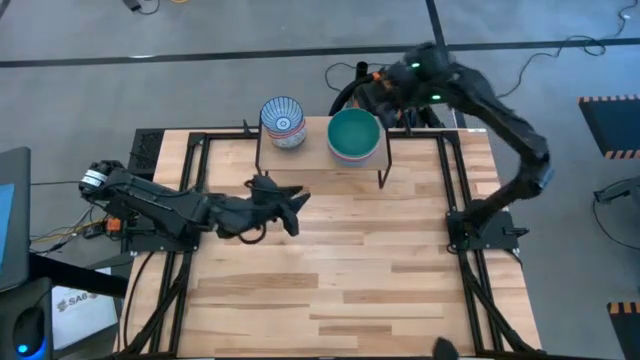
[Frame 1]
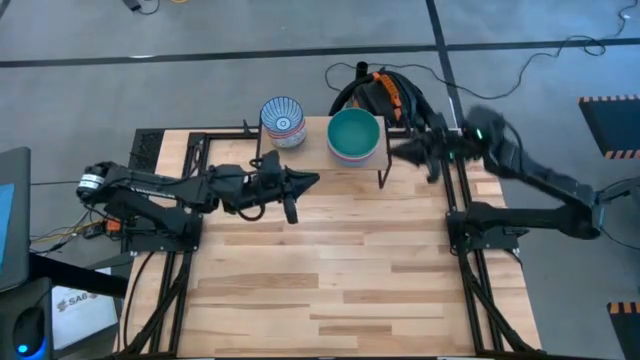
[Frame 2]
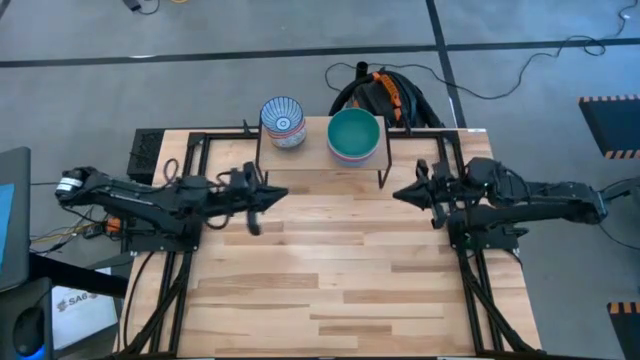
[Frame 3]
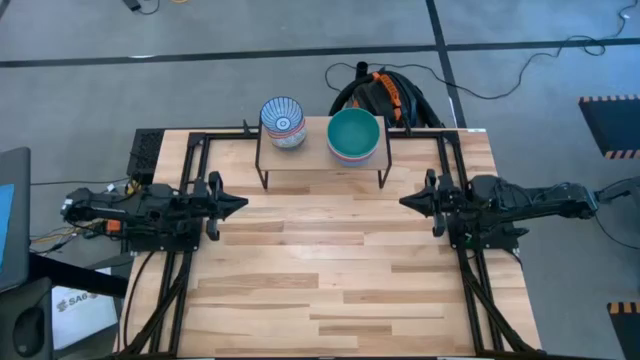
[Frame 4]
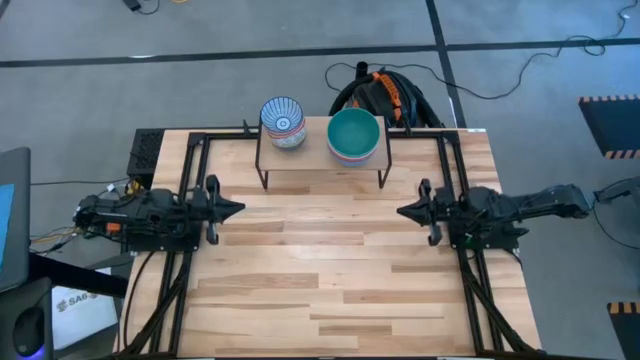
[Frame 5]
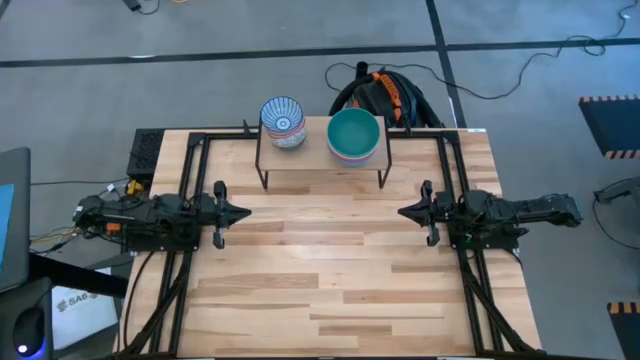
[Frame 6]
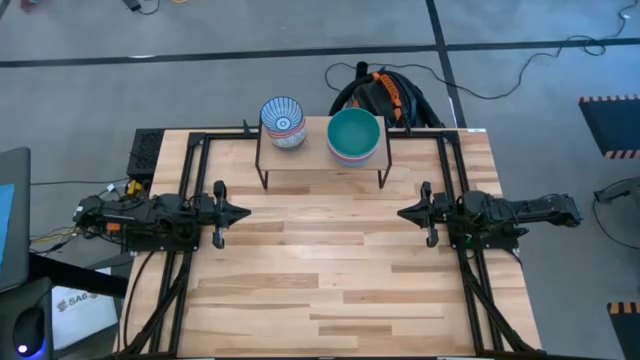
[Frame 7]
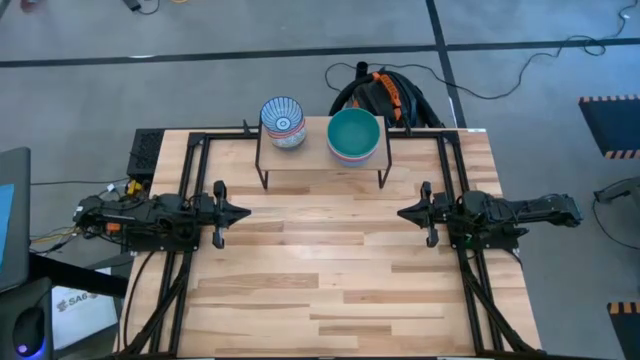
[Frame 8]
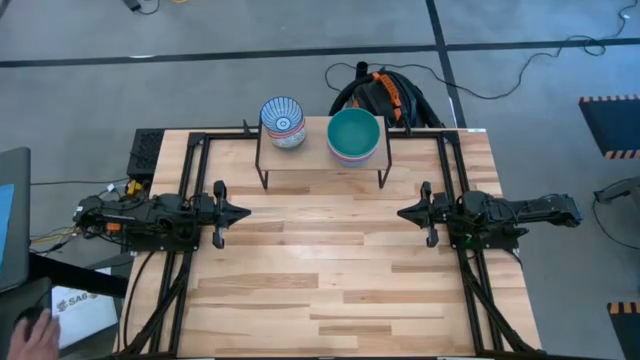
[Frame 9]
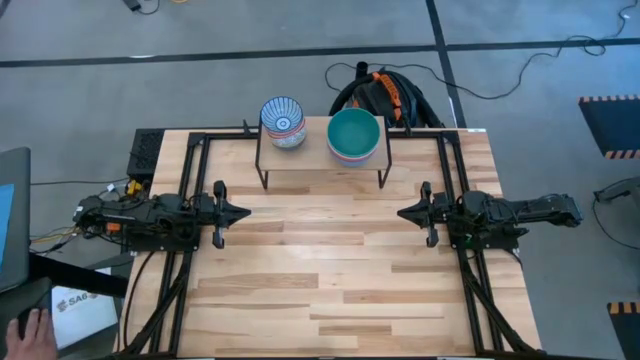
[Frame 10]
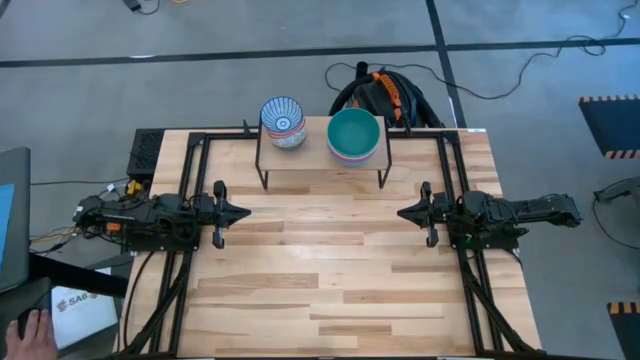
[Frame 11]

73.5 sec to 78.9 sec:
Task: Place and stack bowls onto a shelf
Return to Home Position

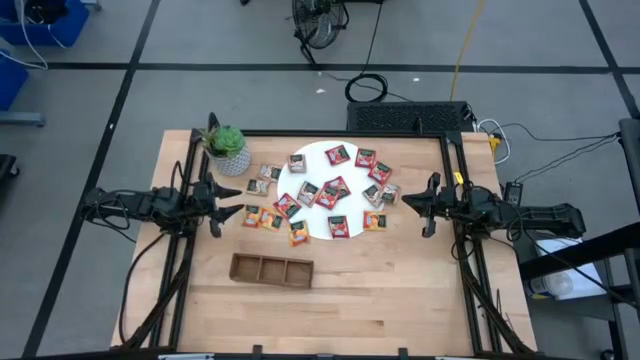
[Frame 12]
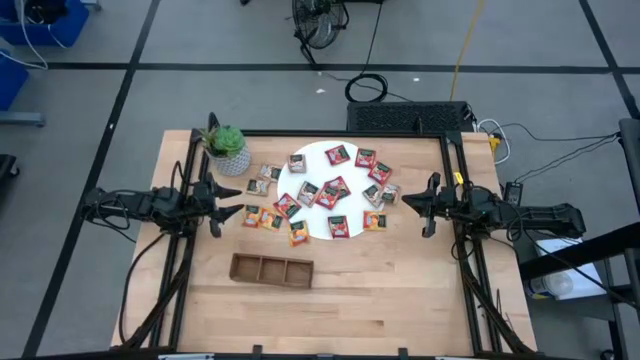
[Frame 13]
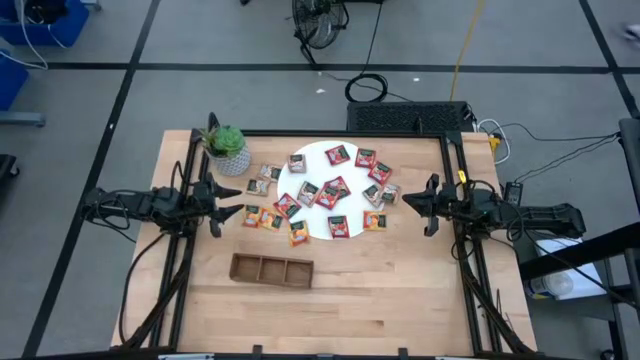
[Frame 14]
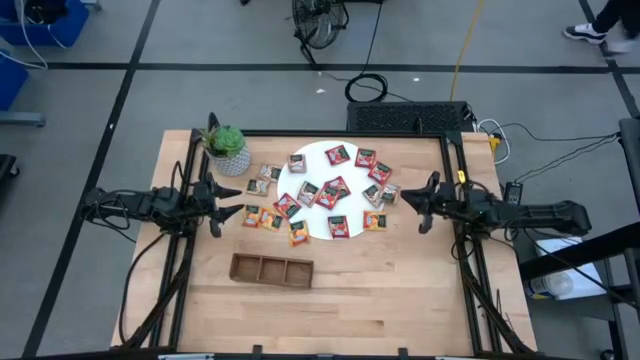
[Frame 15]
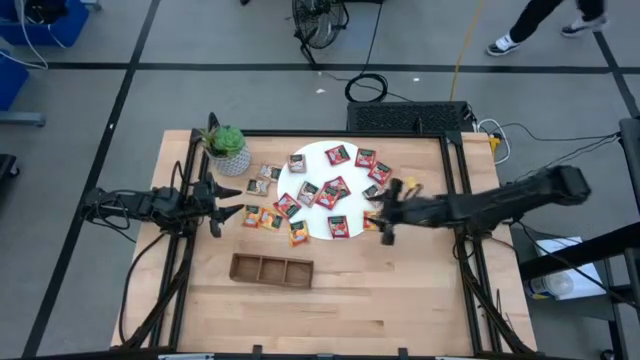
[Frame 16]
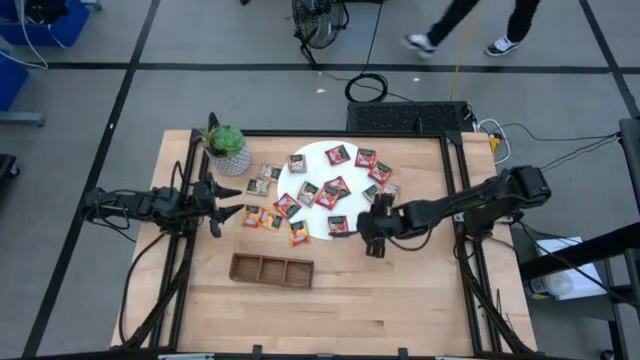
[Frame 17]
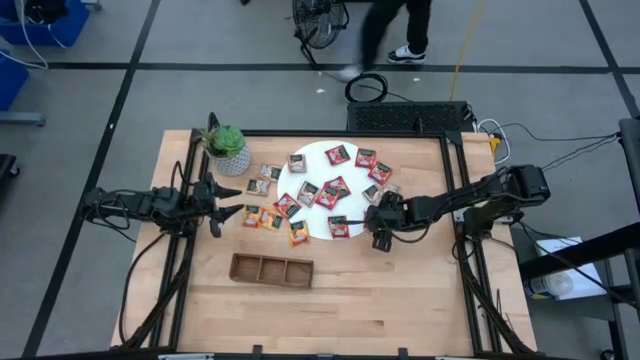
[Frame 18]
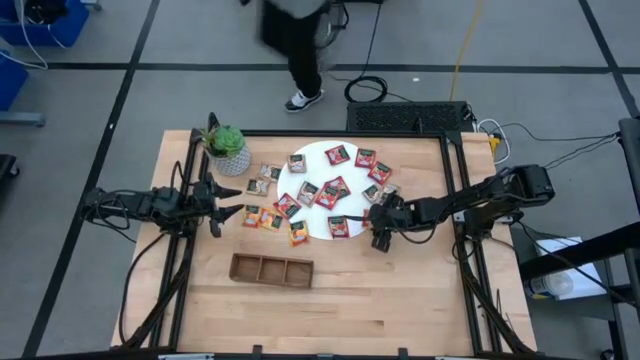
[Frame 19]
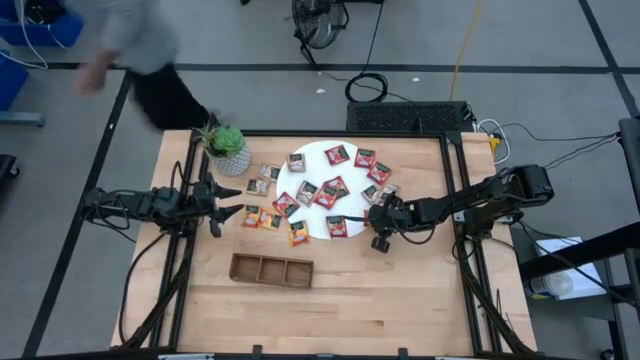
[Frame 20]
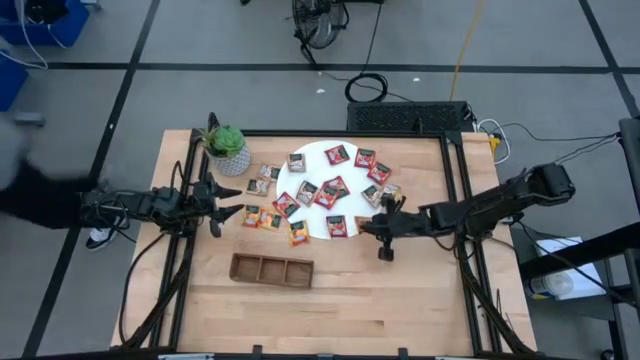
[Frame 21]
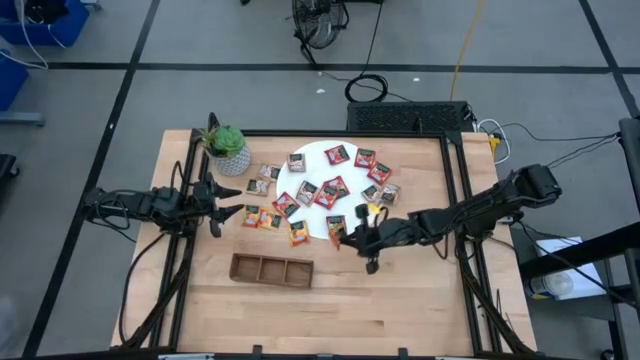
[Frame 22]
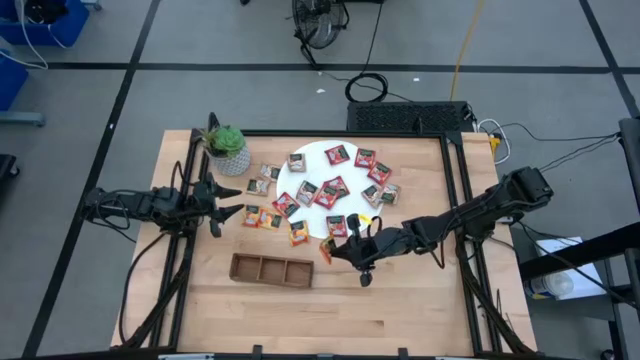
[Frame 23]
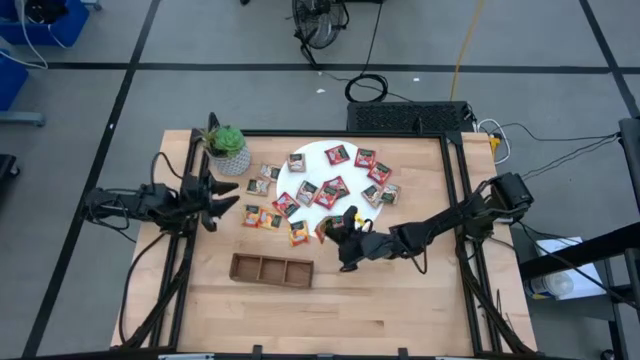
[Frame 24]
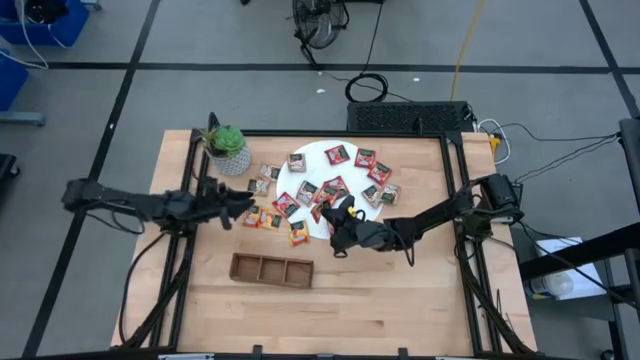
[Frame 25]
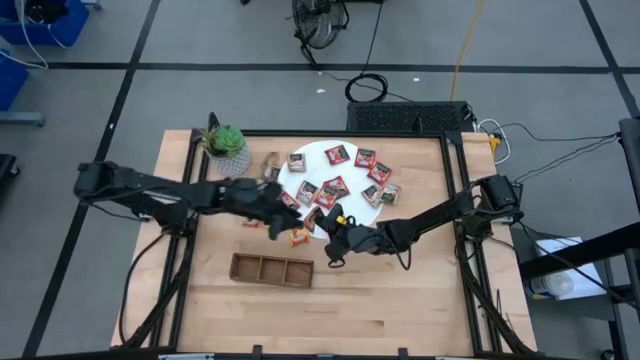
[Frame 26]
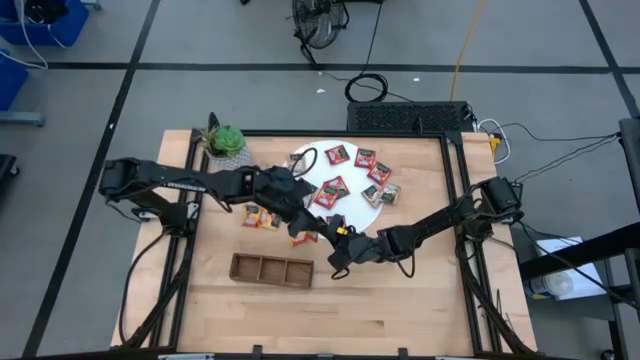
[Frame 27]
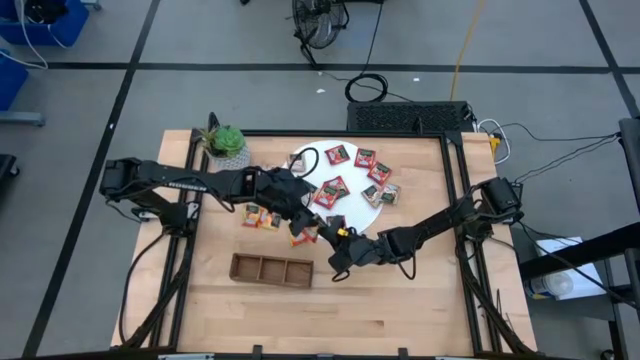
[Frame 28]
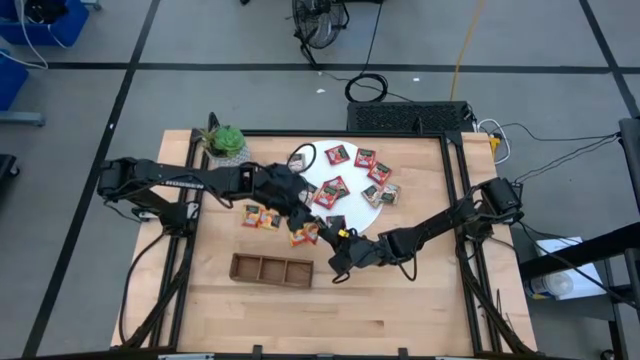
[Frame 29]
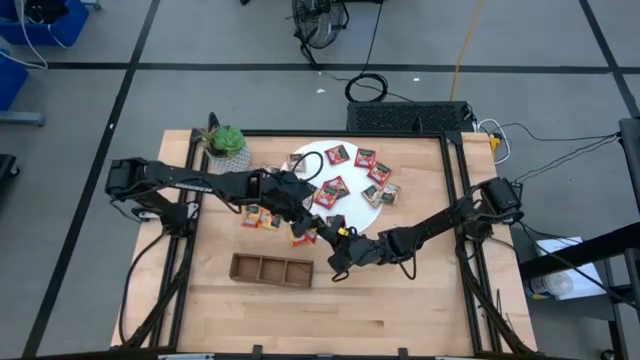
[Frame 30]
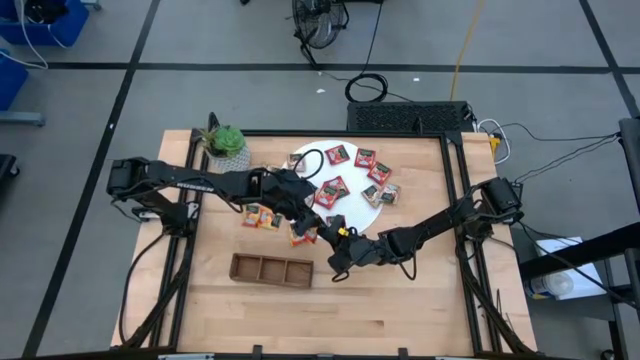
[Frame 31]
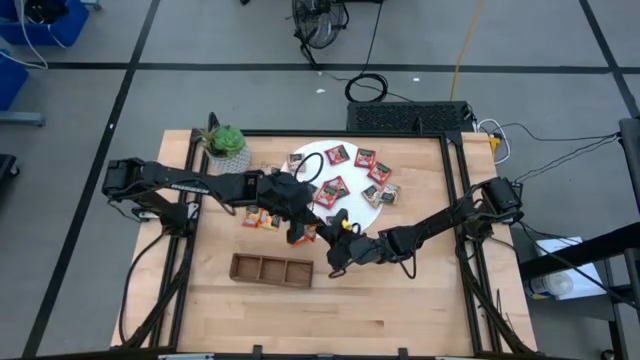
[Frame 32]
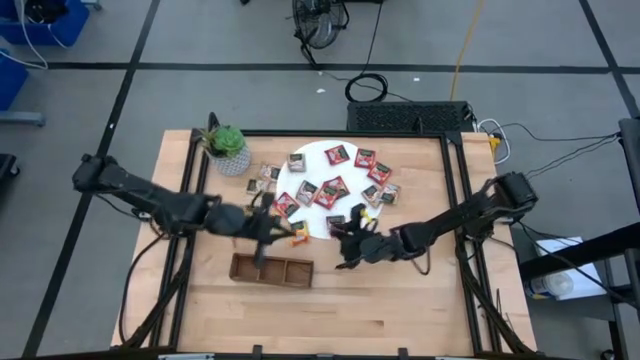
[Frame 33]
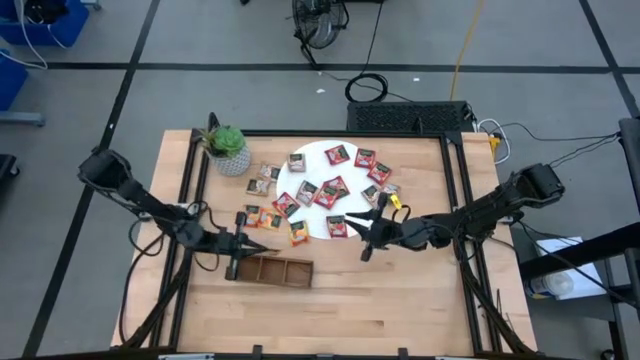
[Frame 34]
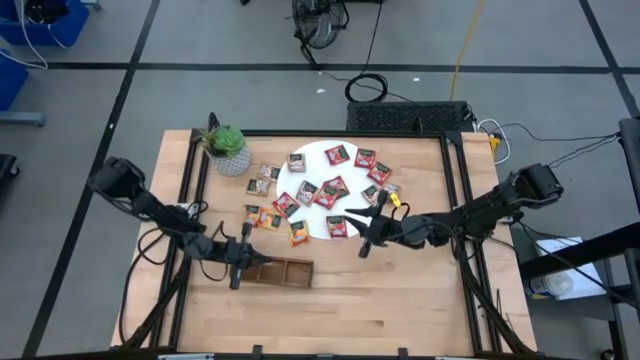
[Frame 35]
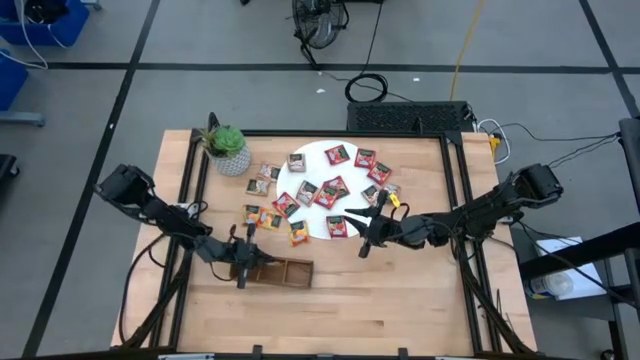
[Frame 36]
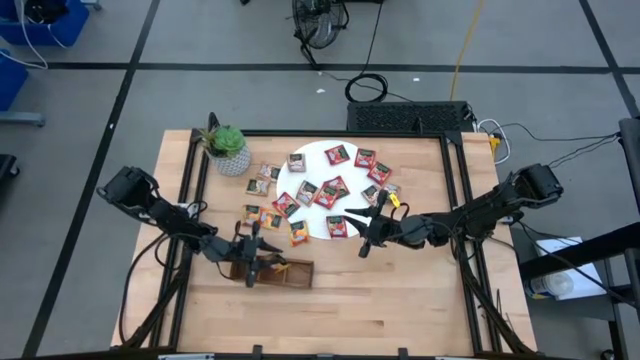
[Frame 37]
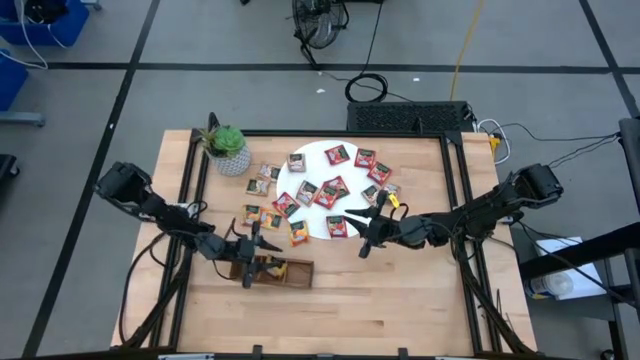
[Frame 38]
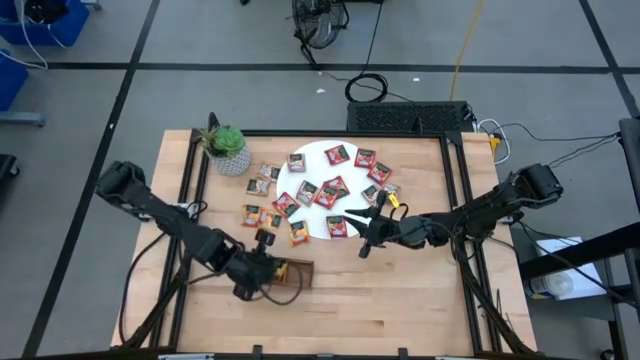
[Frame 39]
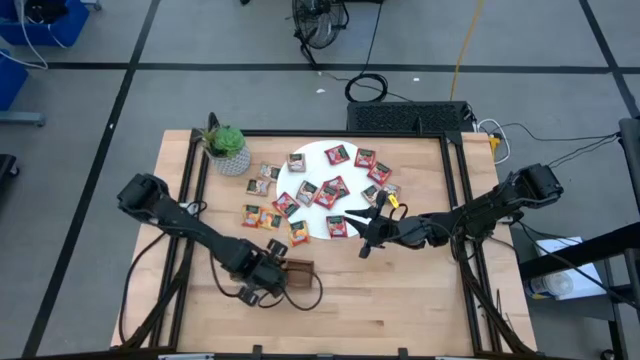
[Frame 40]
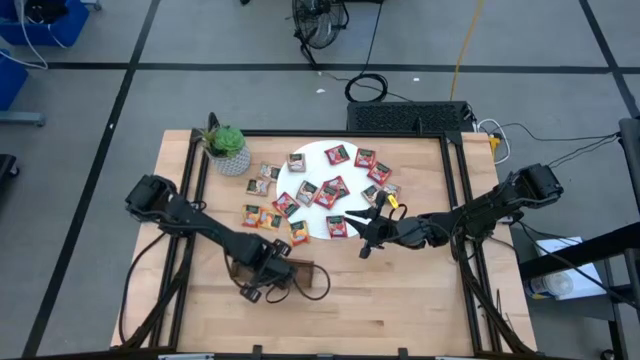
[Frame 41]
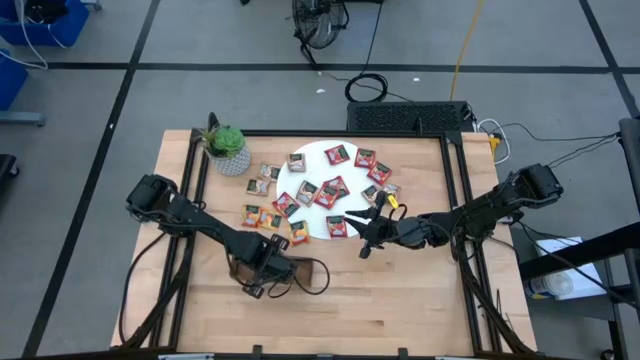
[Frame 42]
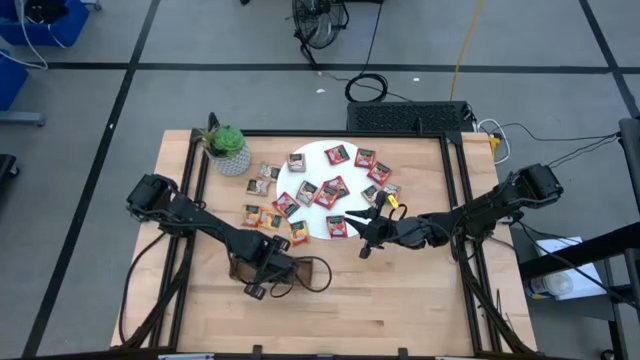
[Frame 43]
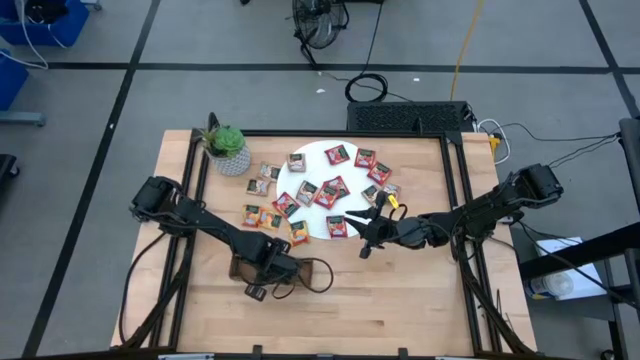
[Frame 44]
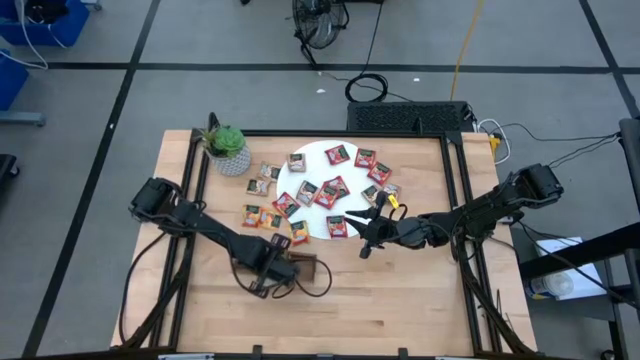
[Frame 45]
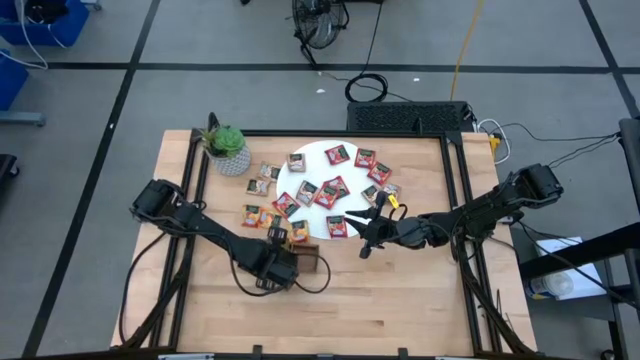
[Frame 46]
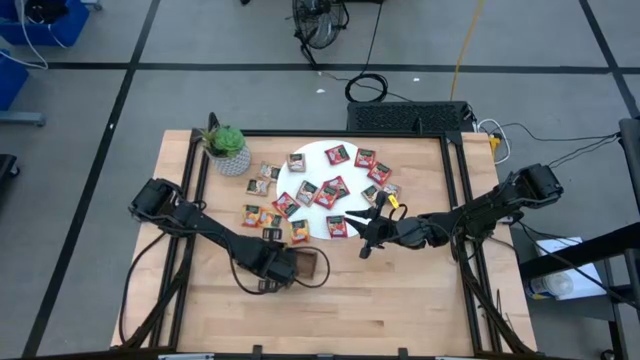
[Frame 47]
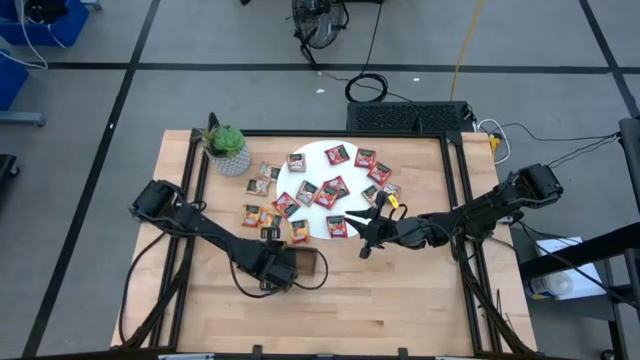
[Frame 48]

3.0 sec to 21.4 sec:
Task: Pick & Place Tea
Put the orange tea bag into the middle section of the wooden organizer
